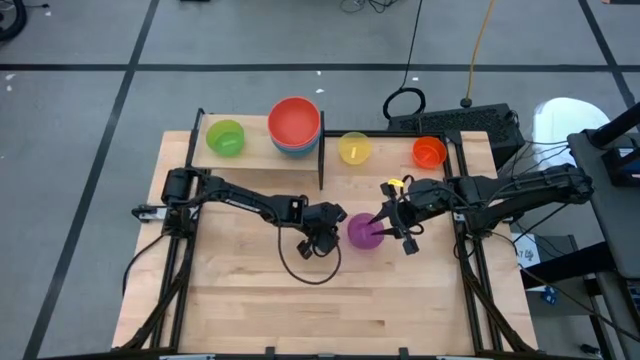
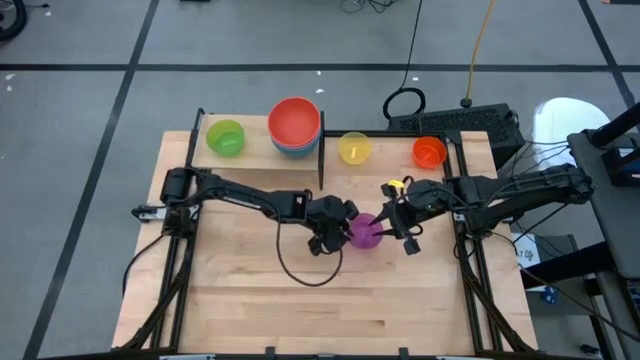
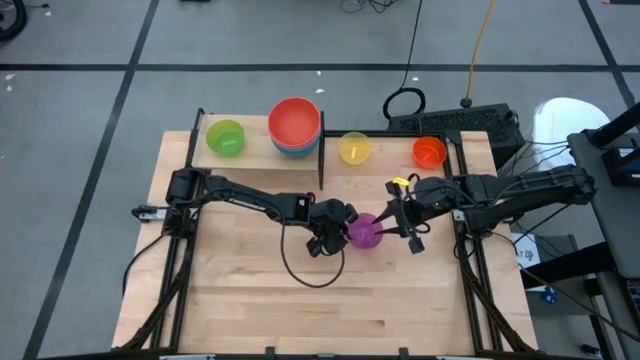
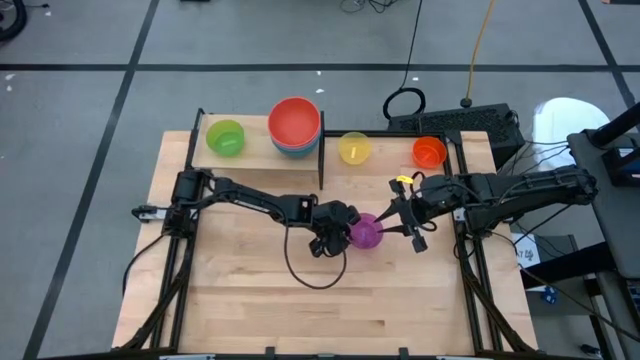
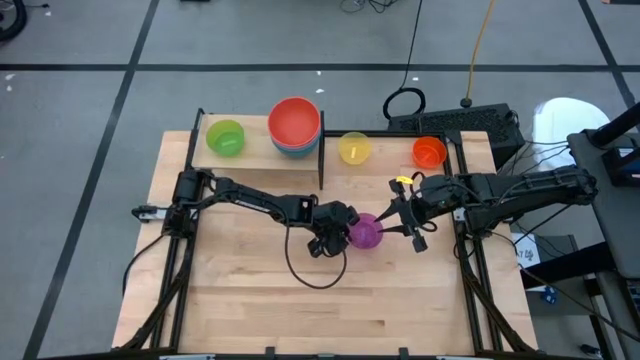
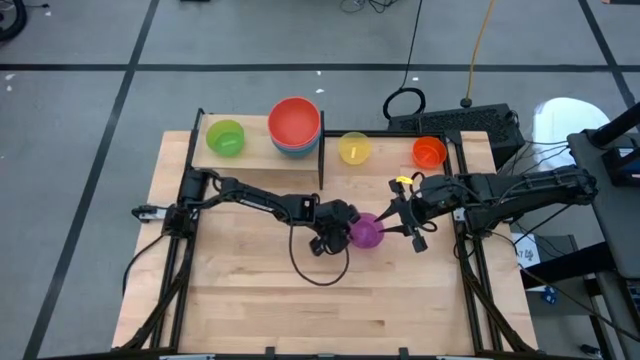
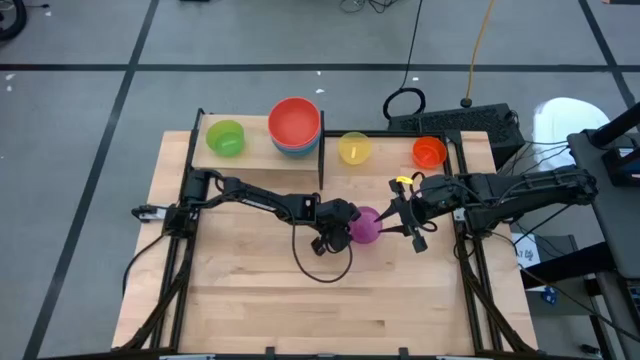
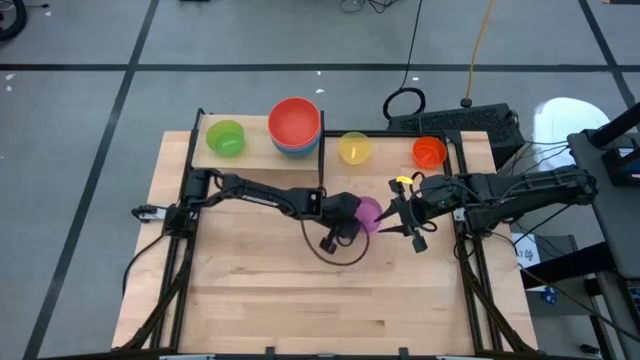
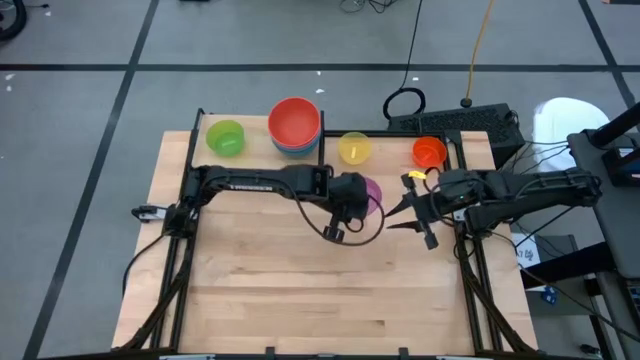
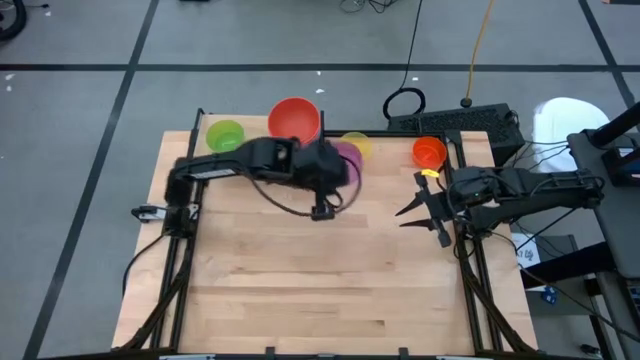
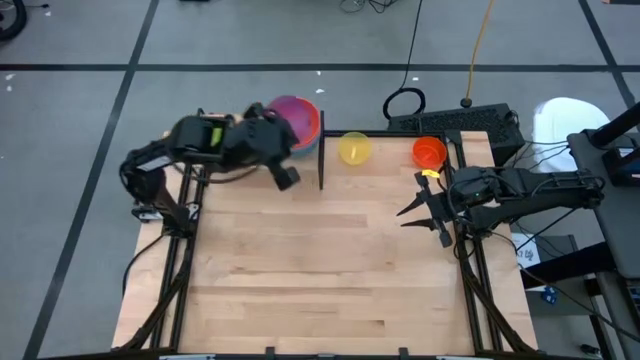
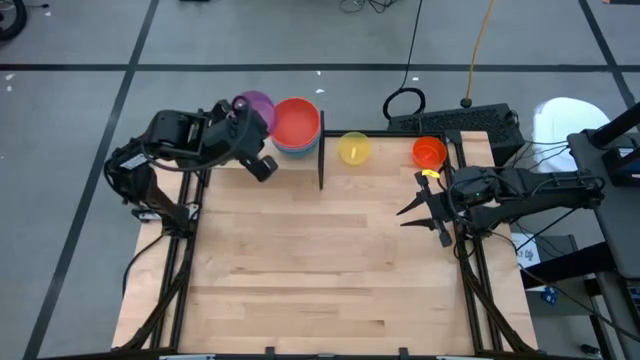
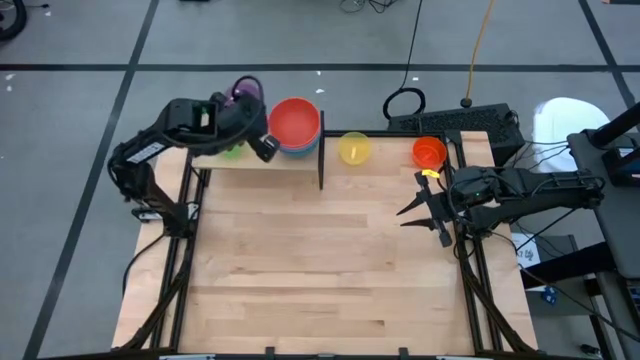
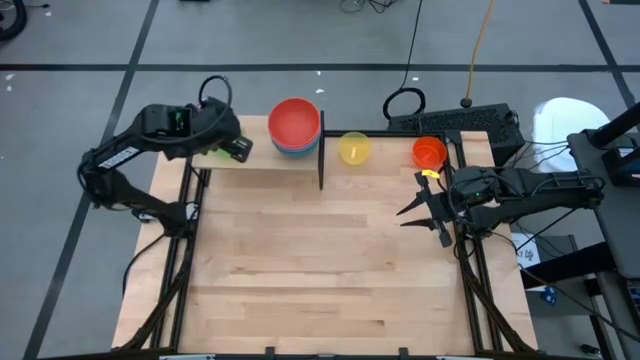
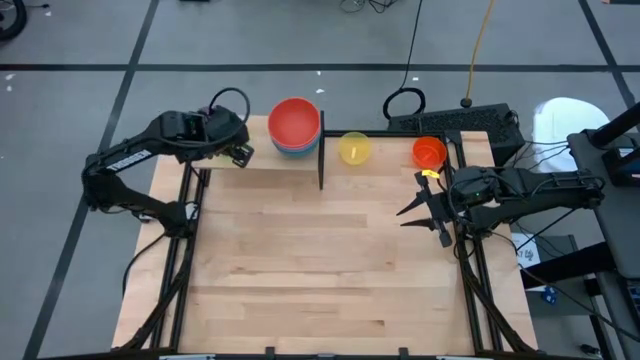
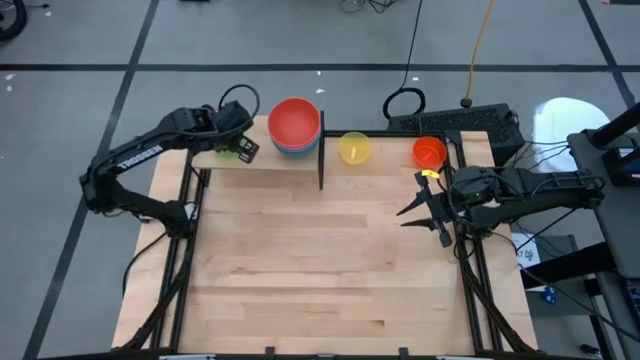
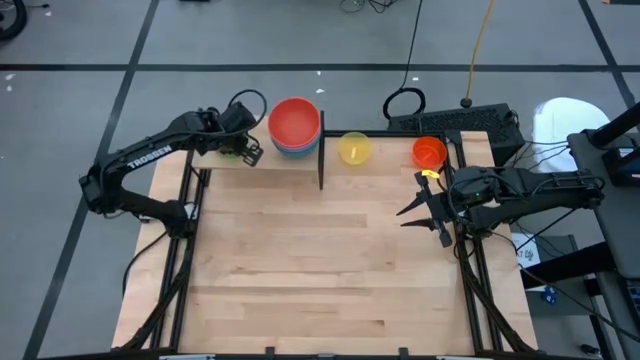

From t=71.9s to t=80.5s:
Task: Place and stack bowls onto a shelf
Stack the purple bowl on top of the green bowl on the shelf

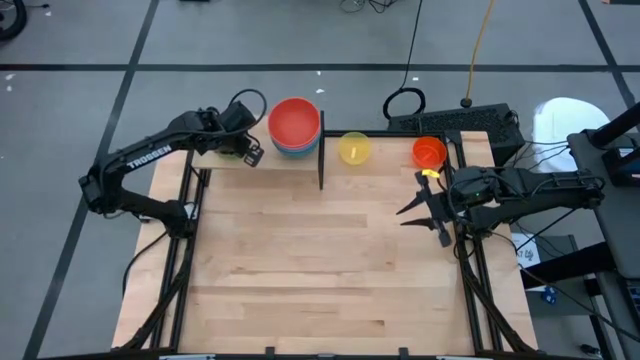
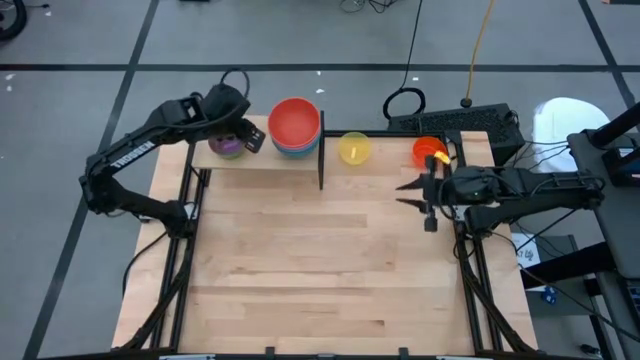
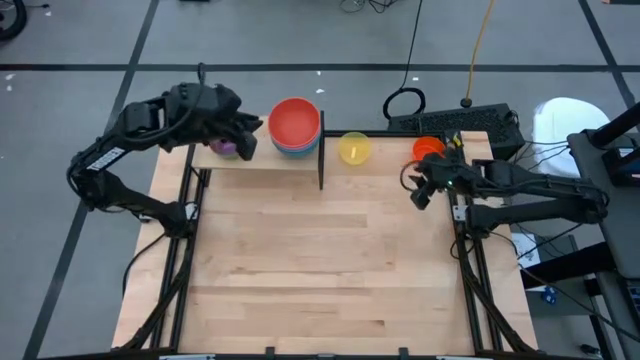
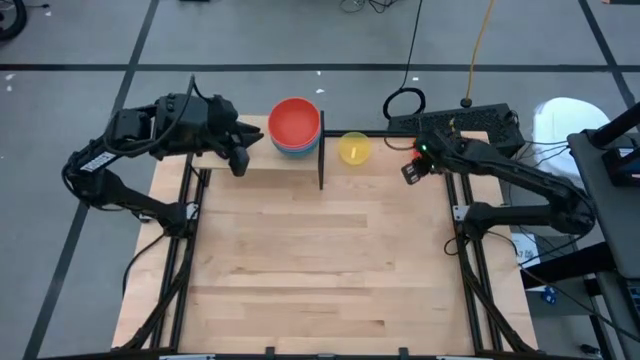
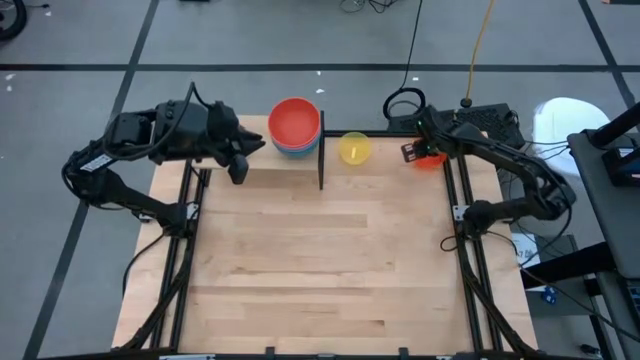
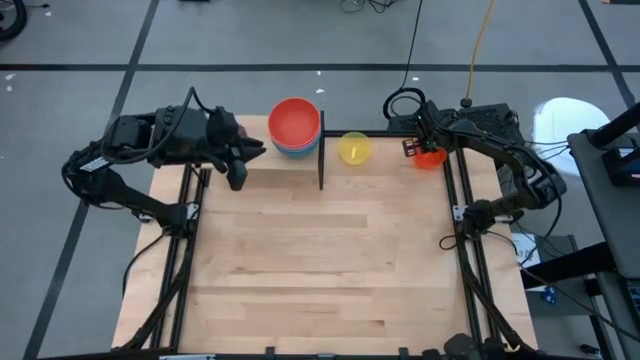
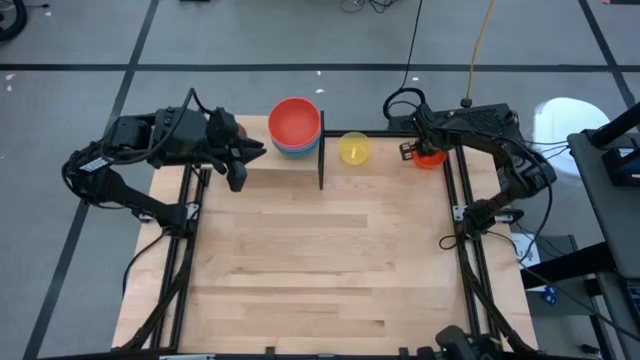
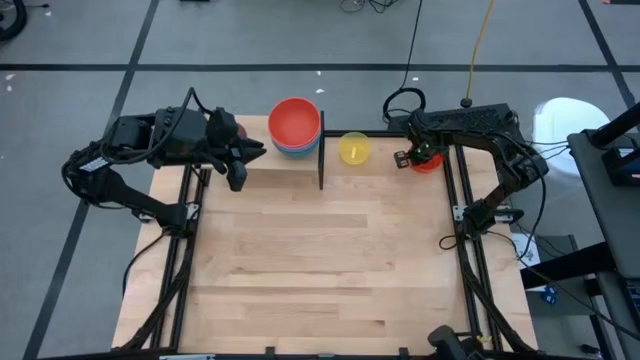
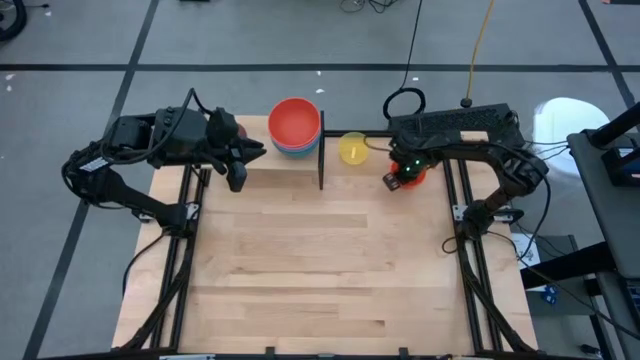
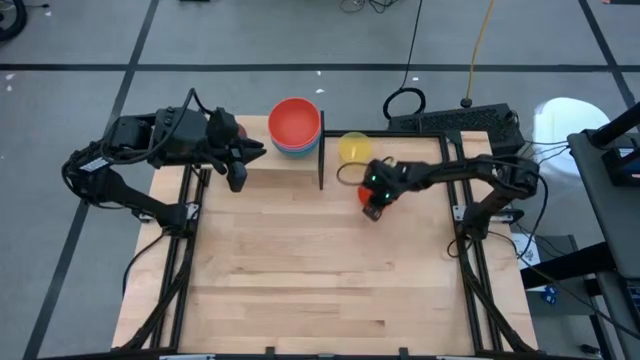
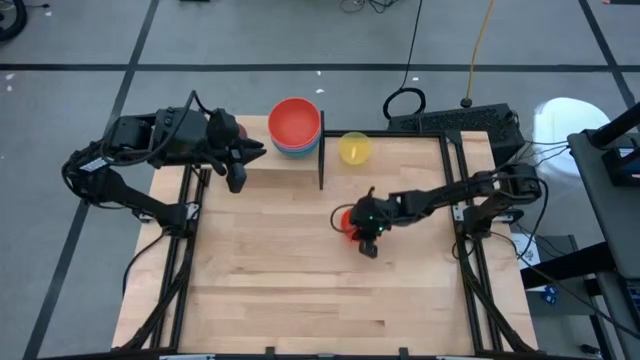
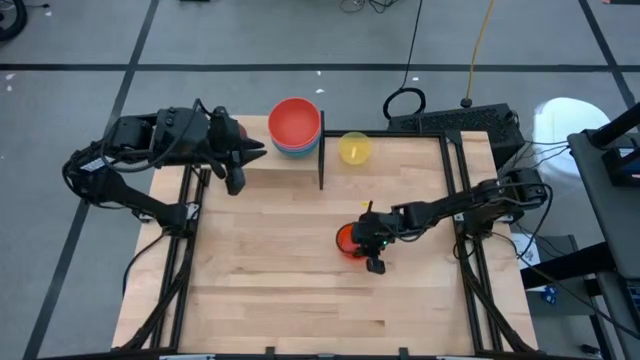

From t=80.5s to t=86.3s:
Move the orange bowl to the center

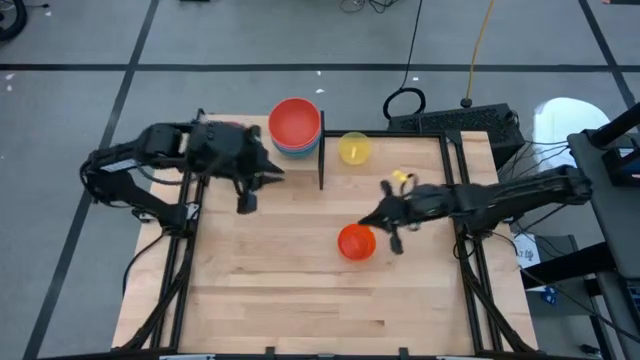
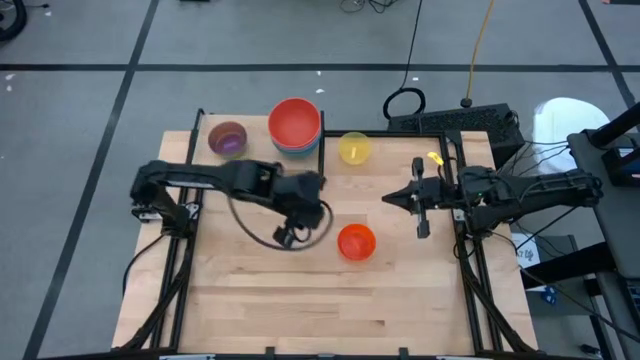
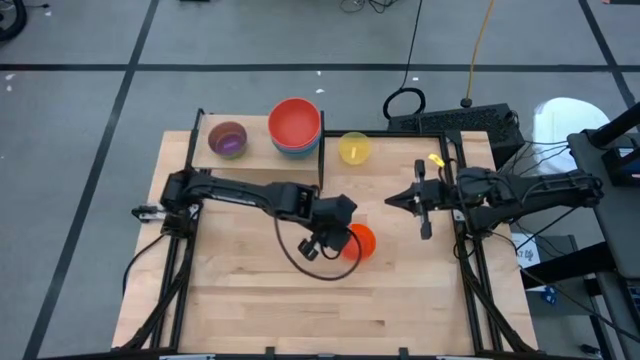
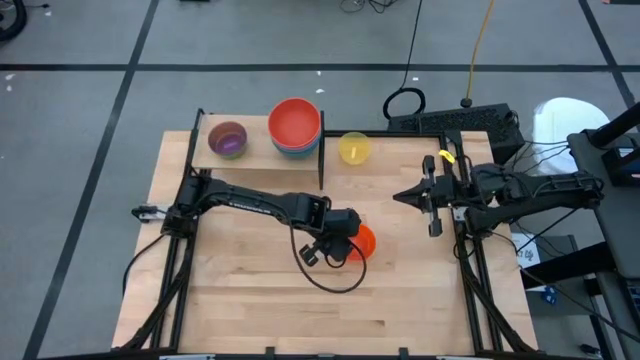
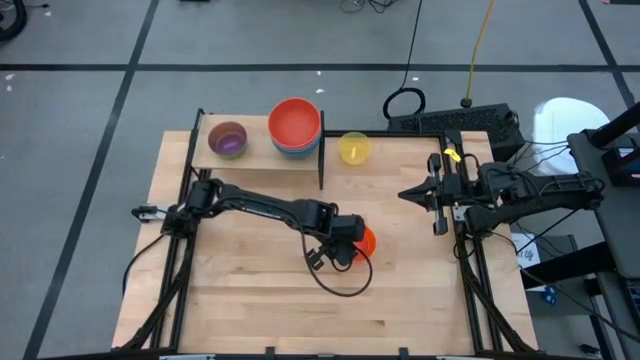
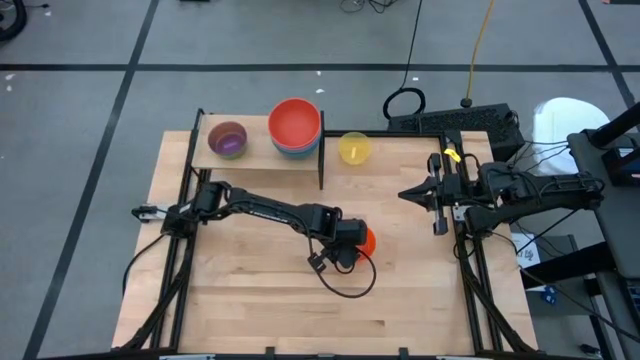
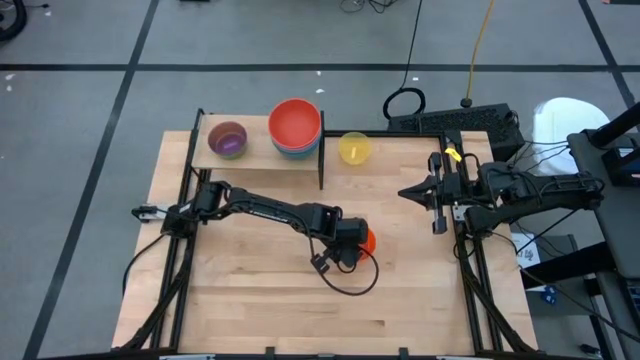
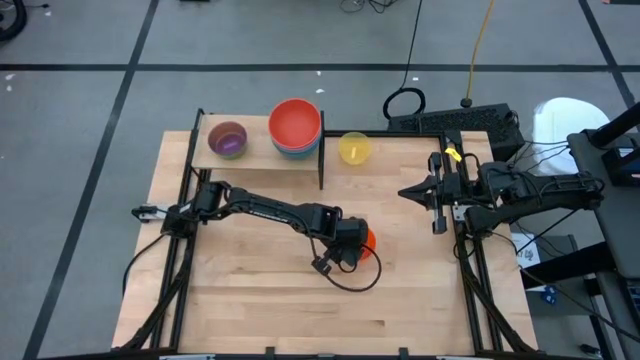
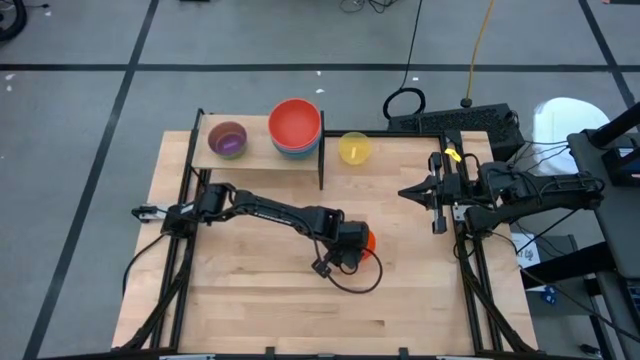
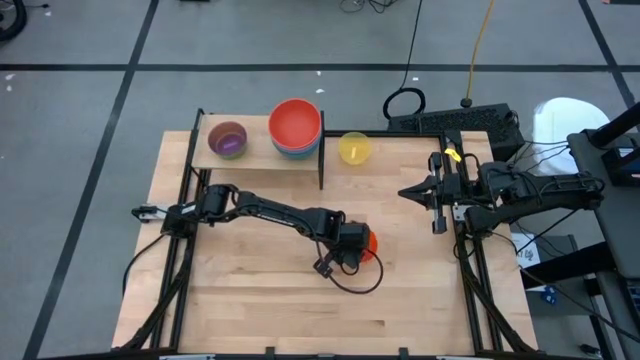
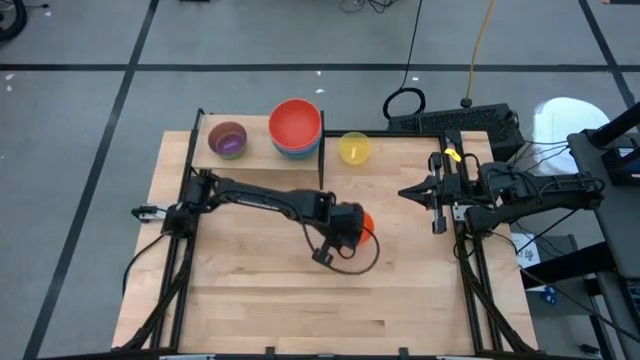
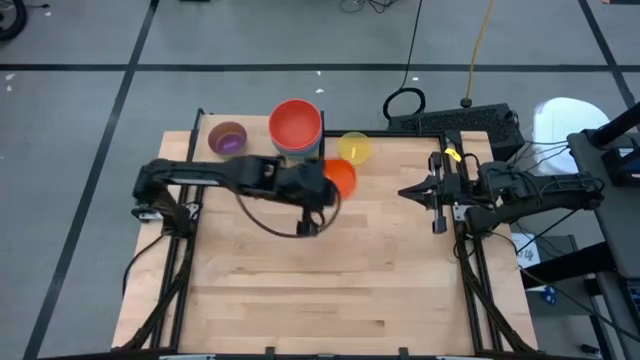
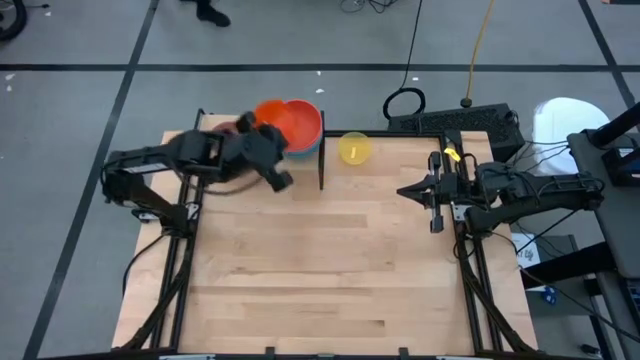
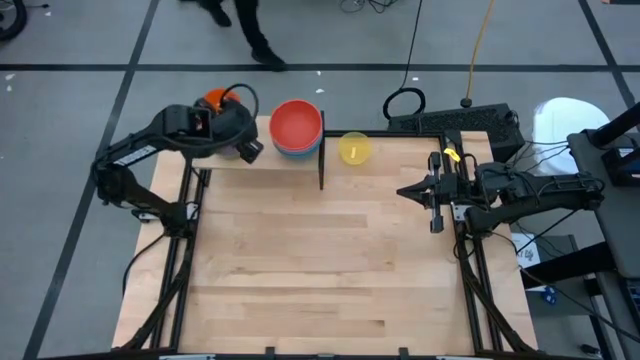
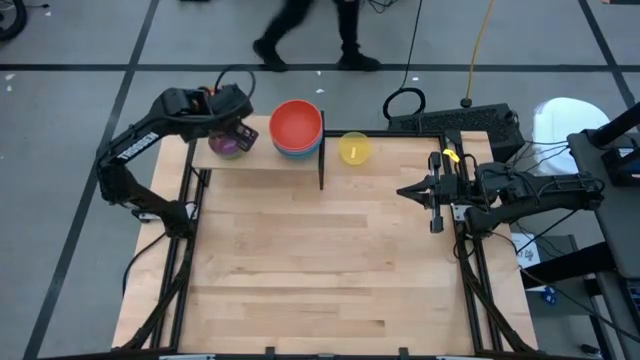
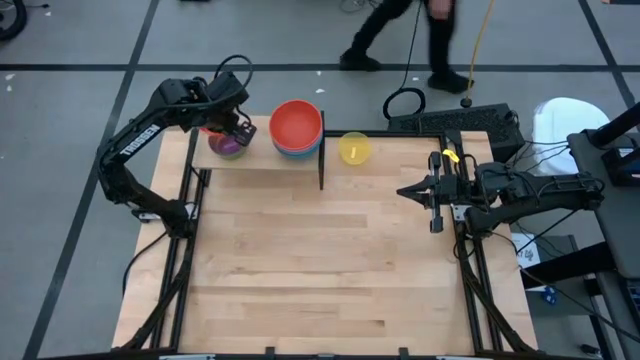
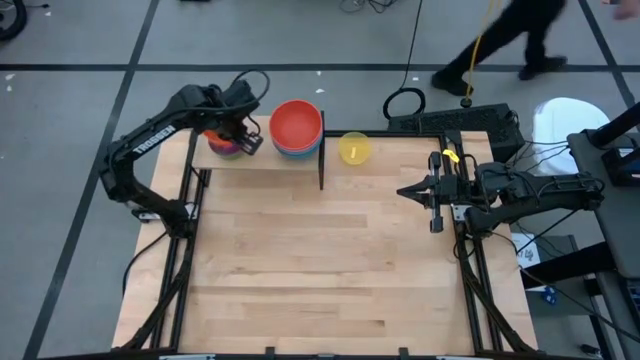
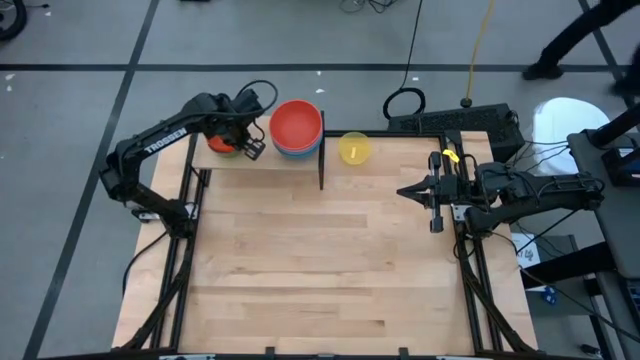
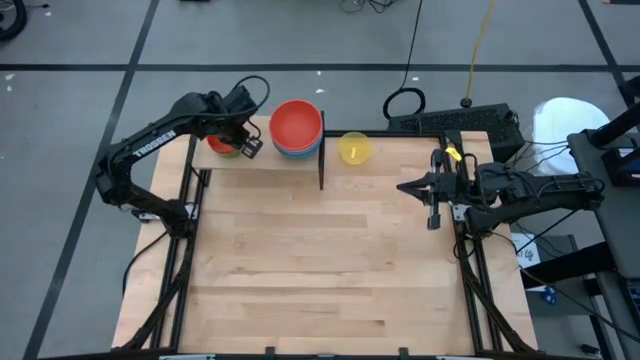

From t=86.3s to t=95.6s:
Stack the orange bowl on top of the violet bowl on the shelf
